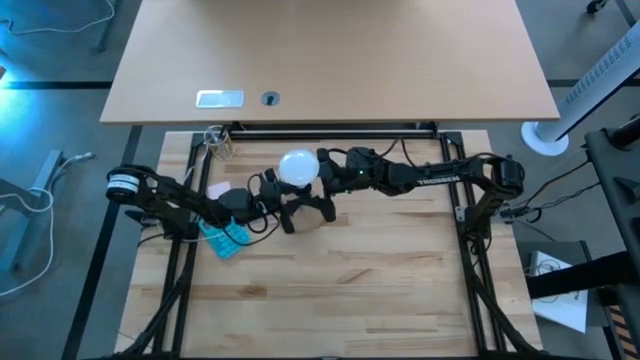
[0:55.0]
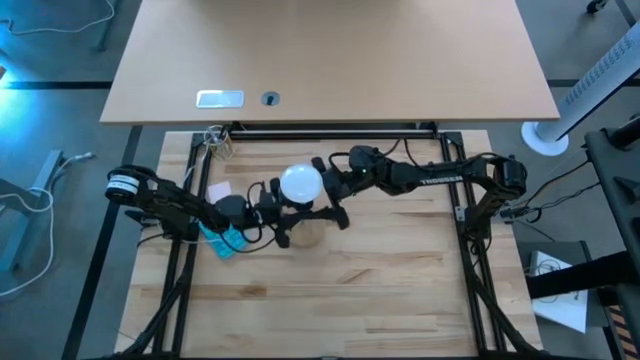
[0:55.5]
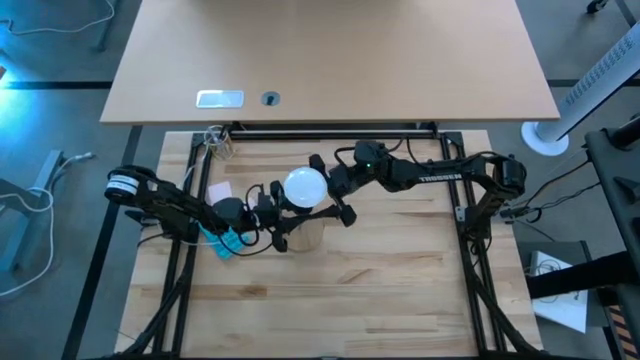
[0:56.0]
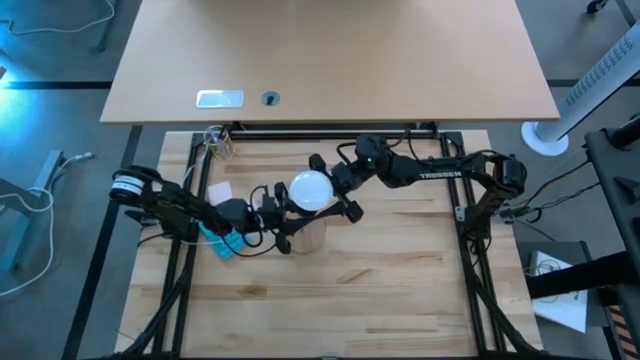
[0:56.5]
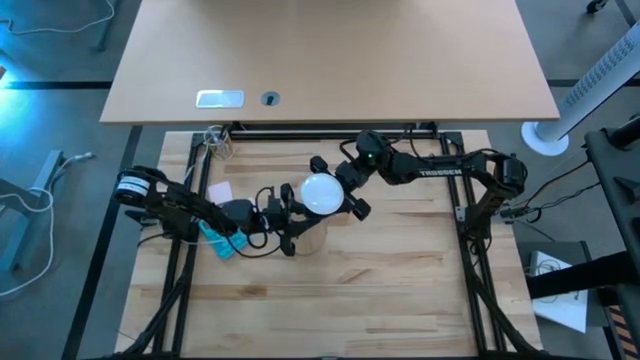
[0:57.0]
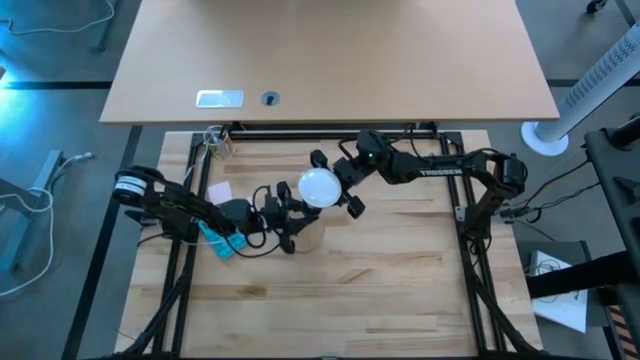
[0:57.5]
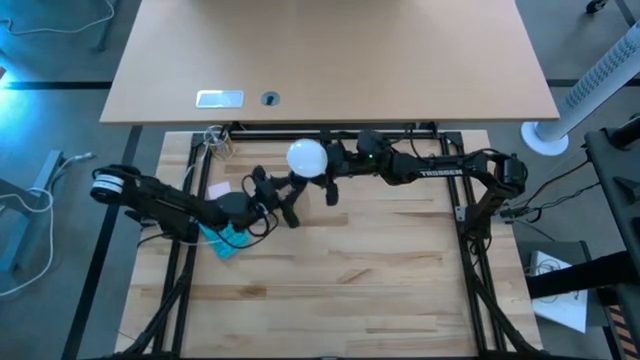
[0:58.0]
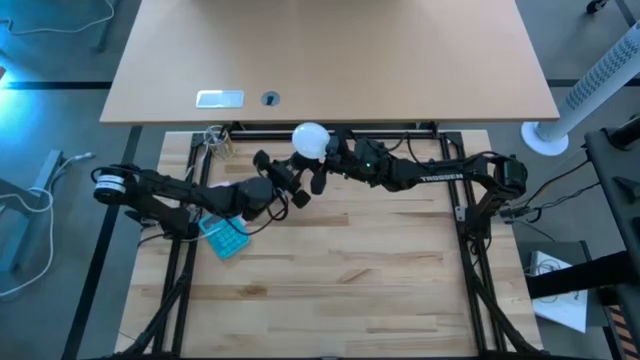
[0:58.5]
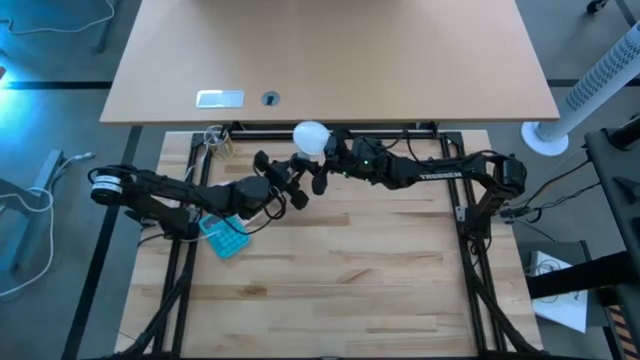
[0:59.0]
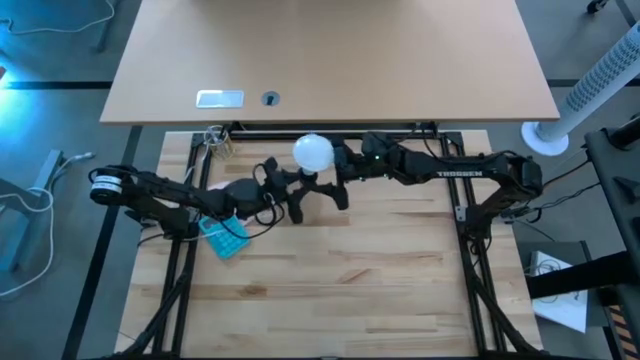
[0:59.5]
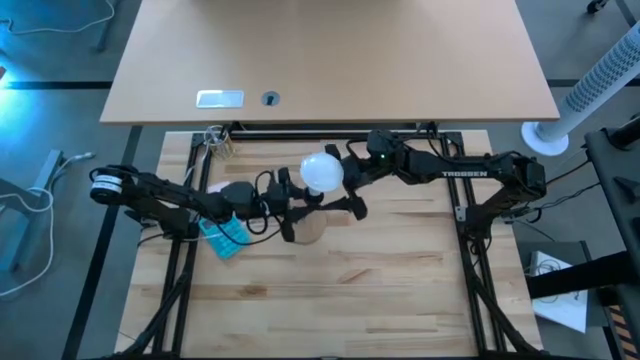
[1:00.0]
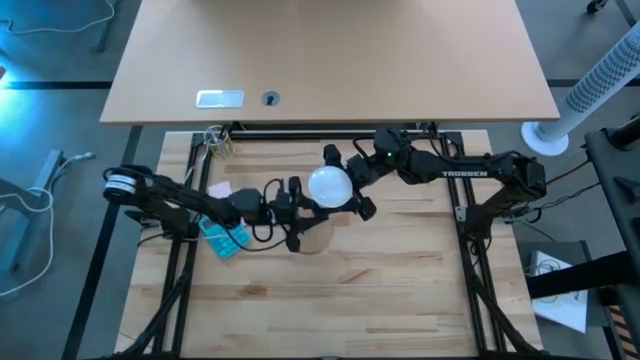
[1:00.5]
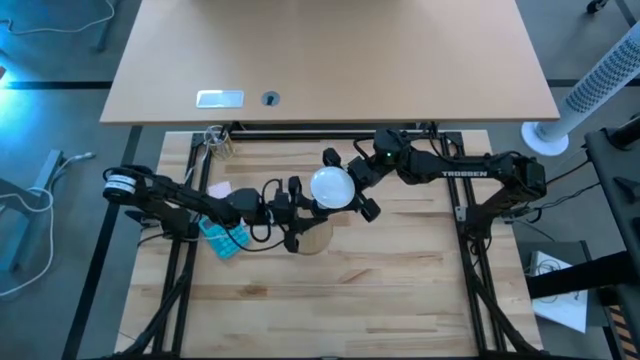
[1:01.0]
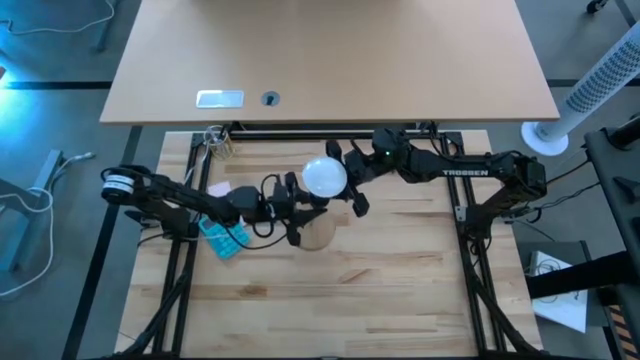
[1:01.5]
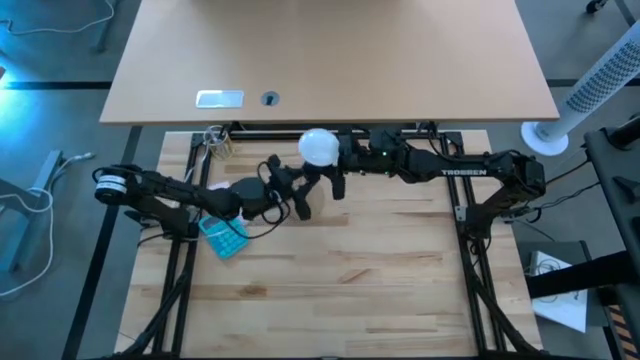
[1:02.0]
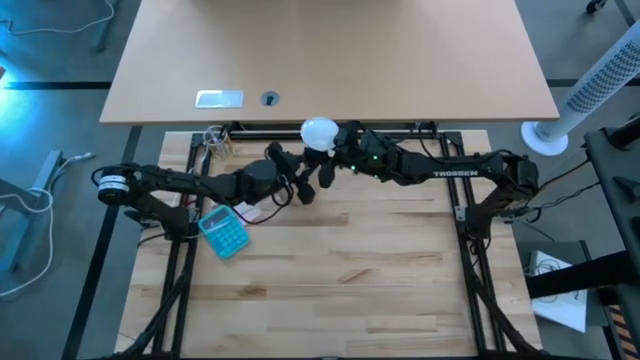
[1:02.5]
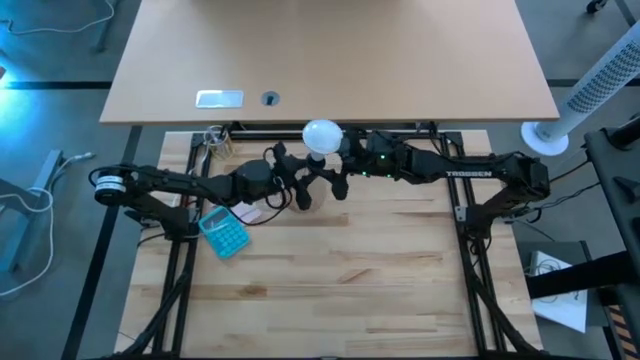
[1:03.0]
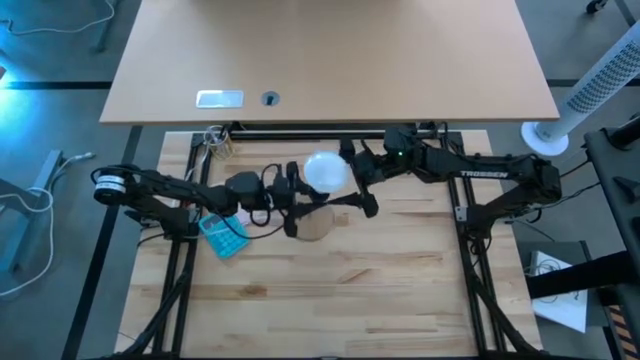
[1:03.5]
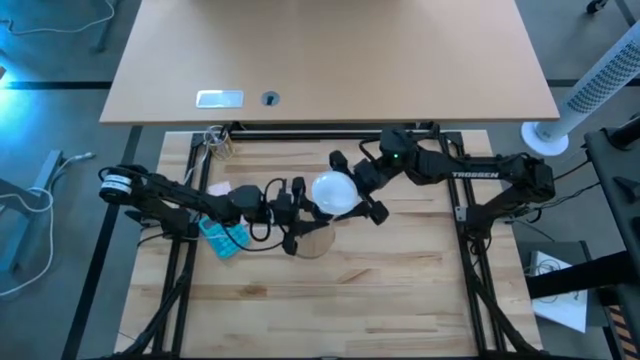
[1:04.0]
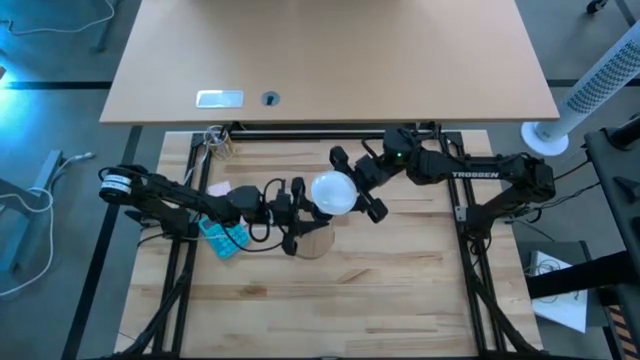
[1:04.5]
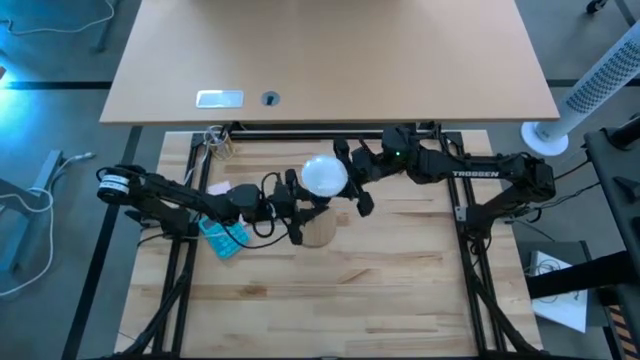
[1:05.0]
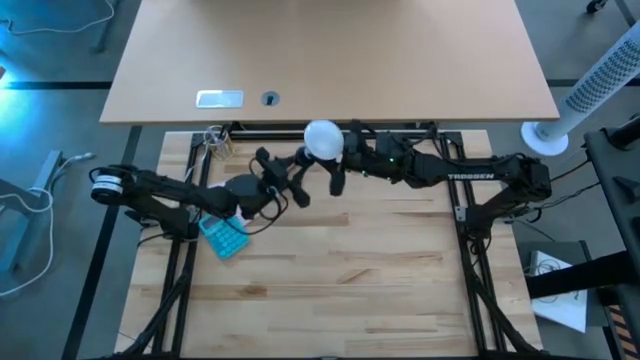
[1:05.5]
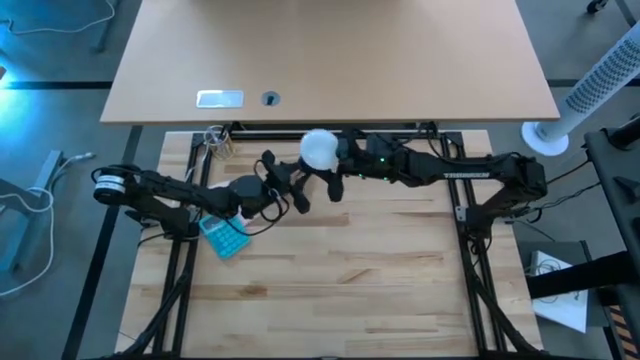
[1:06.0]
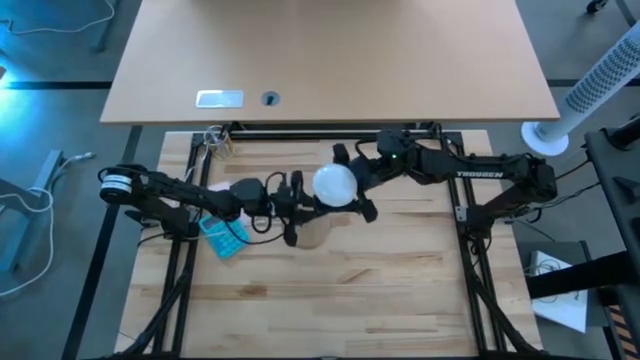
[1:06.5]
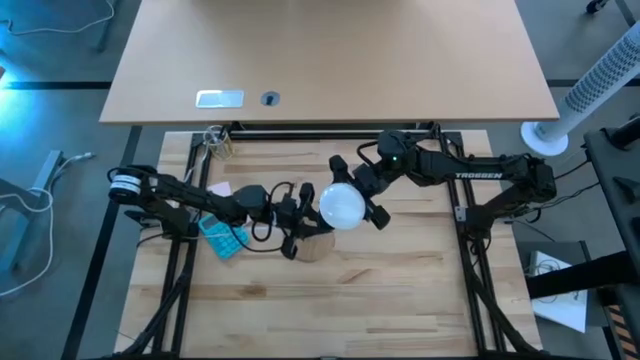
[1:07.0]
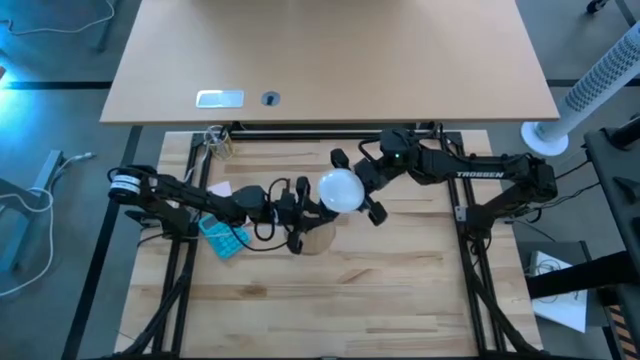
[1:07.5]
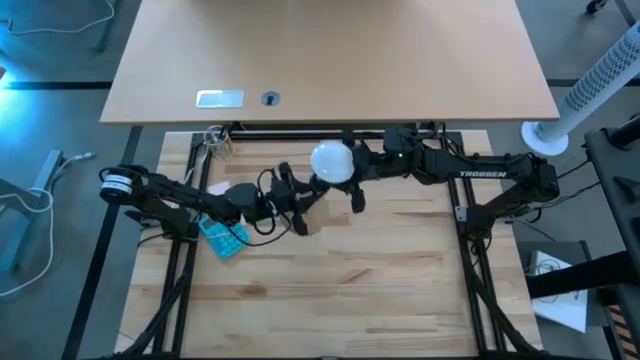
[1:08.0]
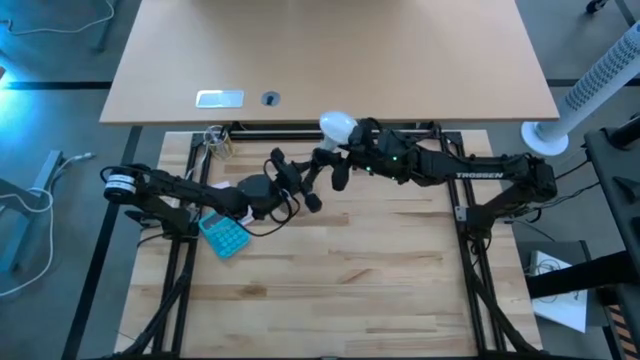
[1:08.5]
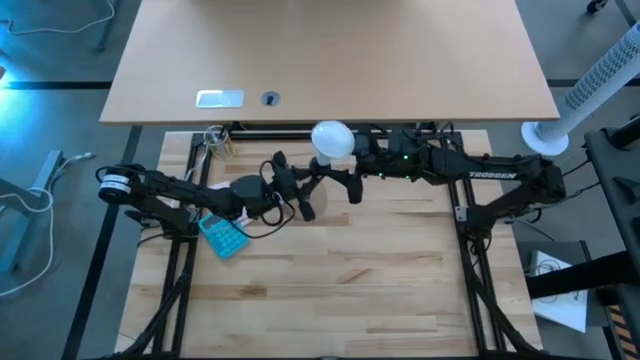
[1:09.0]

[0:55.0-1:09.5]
Task: Screw lightbulb
Insert the lightbulb into the lamp

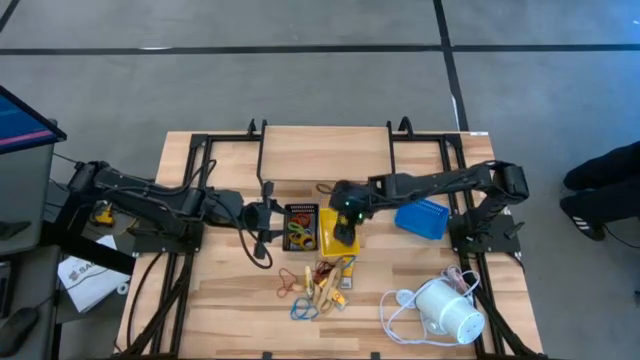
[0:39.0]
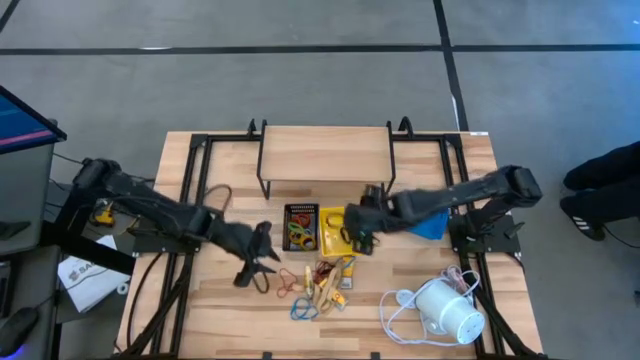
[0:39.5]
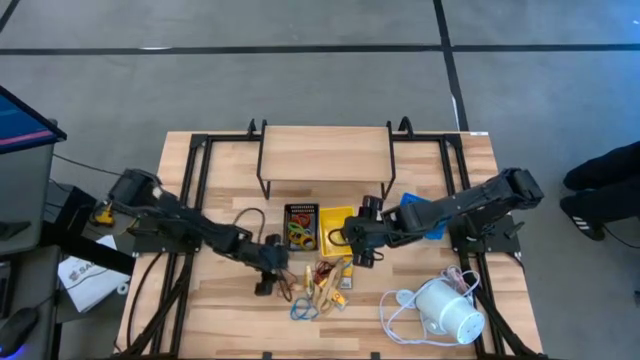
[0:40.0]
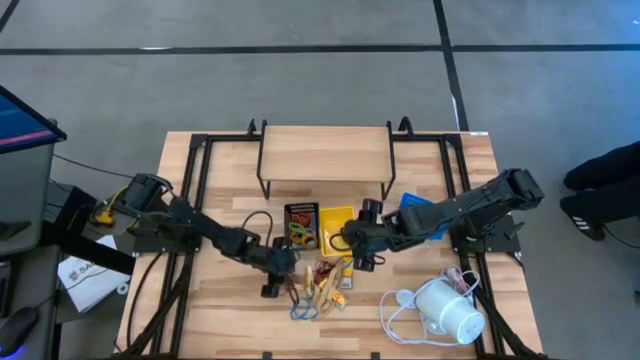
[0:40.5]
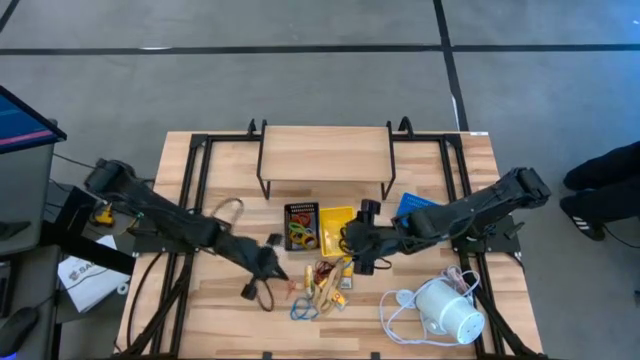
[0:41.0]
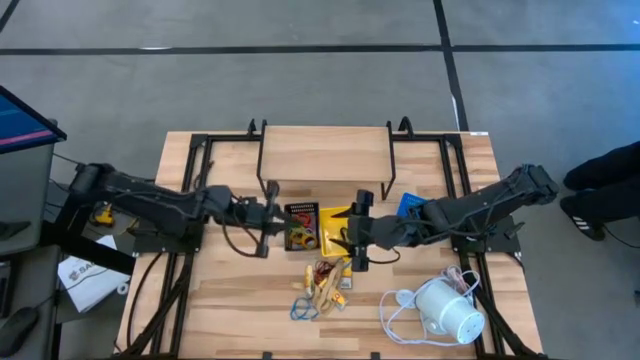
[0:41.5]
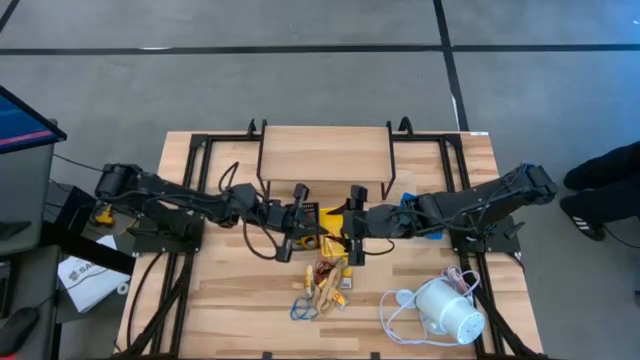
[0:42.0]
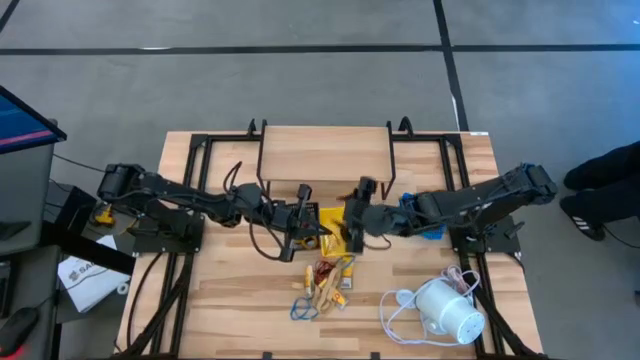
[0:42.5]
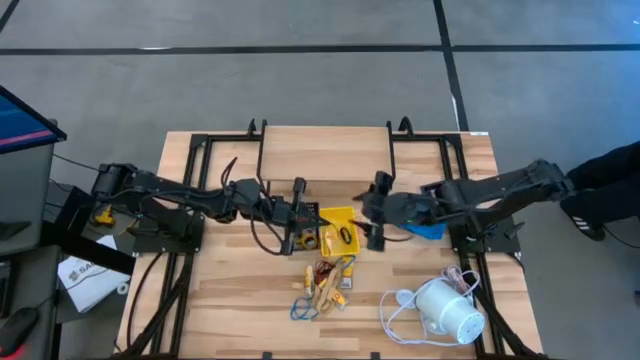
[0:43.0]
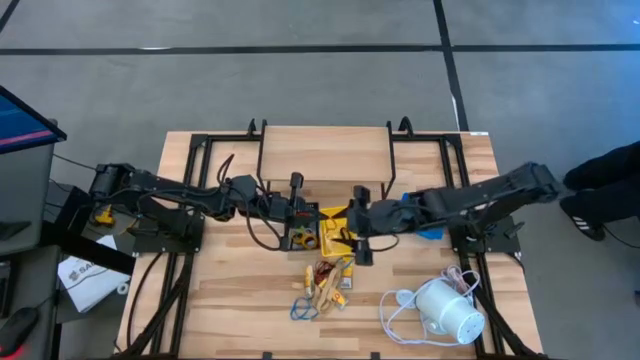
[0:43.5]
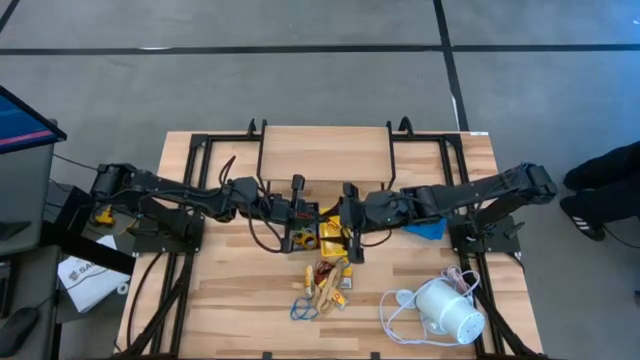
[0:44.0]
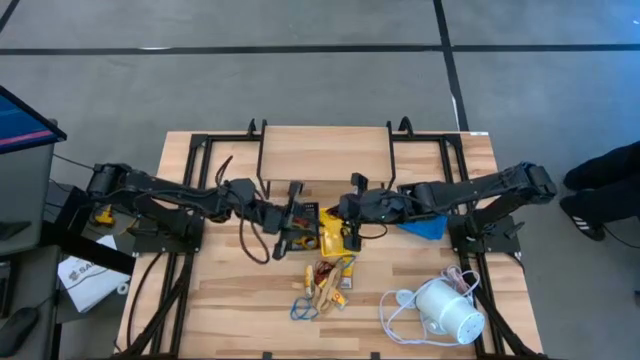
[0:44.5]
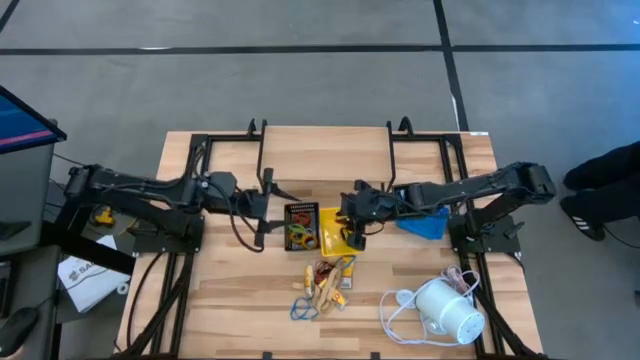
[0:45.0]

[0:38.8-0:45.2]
Task: Pick & Place Office Desk Supplies
Put the red rubber band into the yellow bin

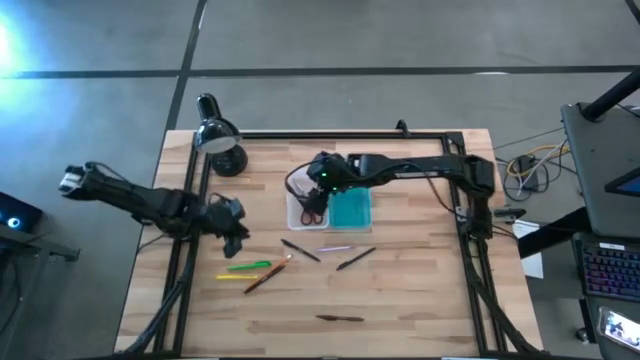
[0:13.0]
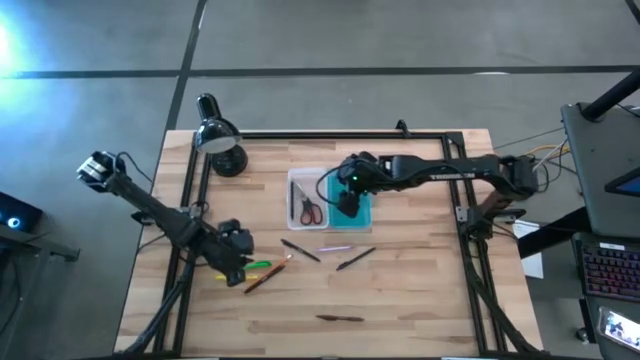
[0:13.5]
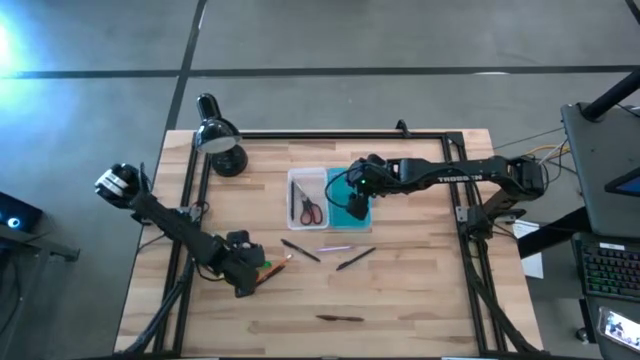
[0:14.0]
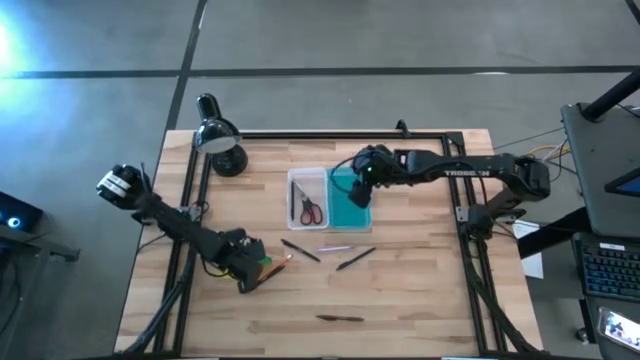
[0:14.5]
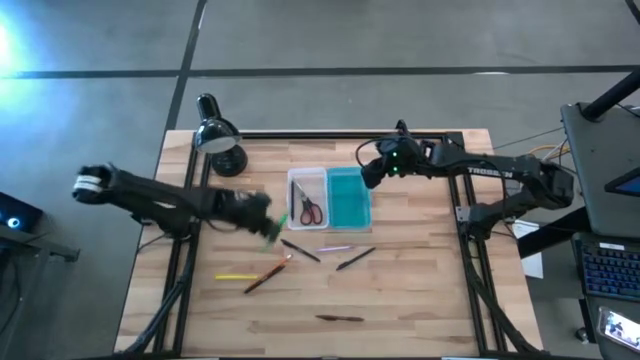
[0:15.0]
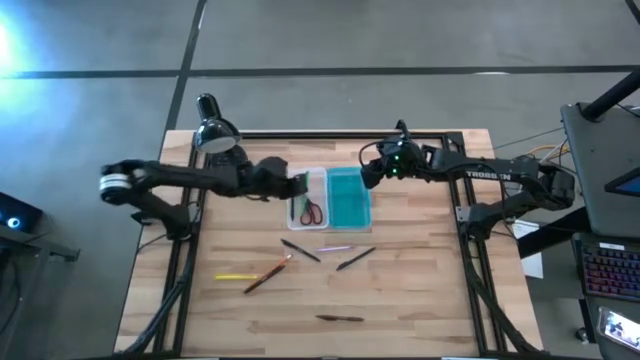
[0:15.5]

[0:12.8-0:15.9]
Task: Pick & place school supplies into a supply box
Put the green pen into the supply box
